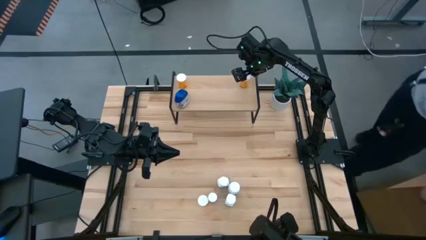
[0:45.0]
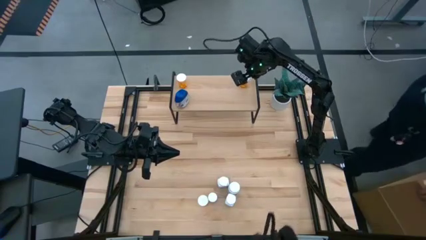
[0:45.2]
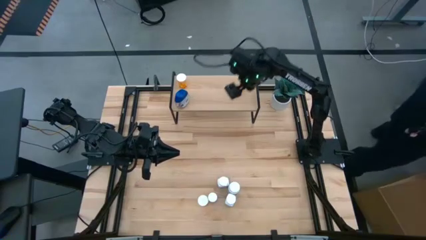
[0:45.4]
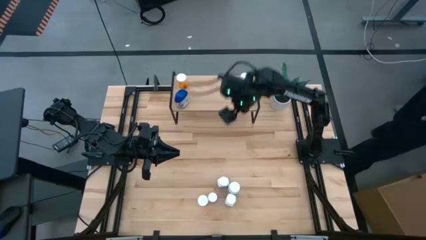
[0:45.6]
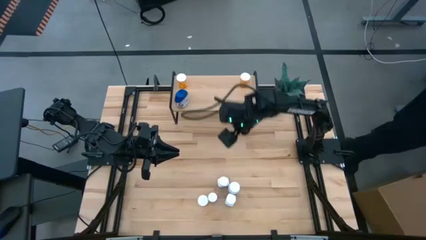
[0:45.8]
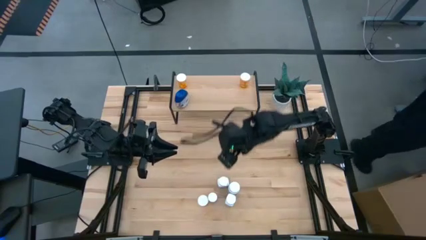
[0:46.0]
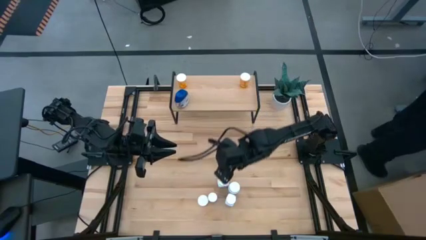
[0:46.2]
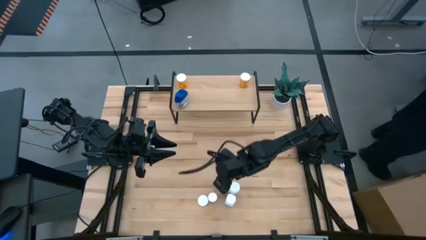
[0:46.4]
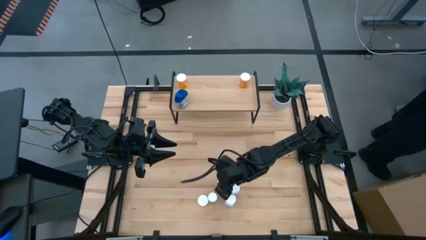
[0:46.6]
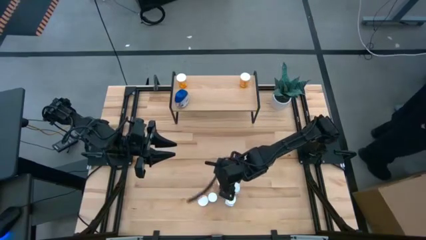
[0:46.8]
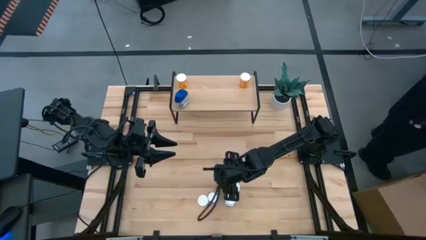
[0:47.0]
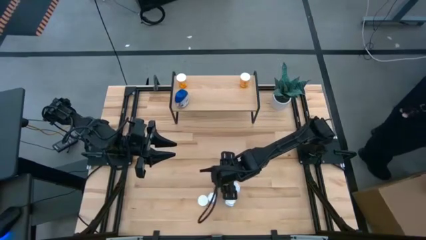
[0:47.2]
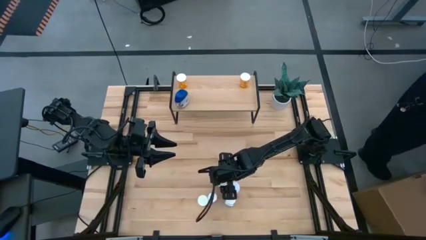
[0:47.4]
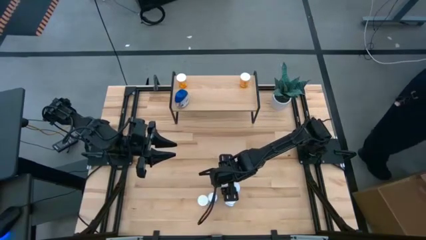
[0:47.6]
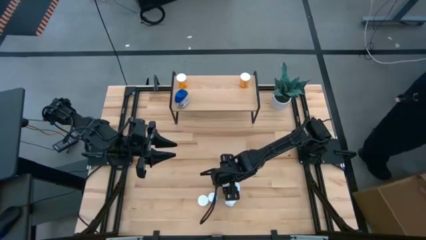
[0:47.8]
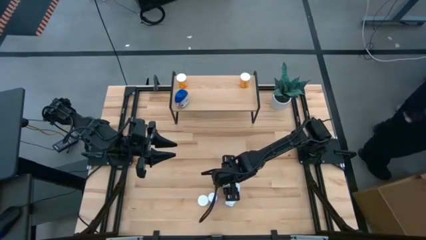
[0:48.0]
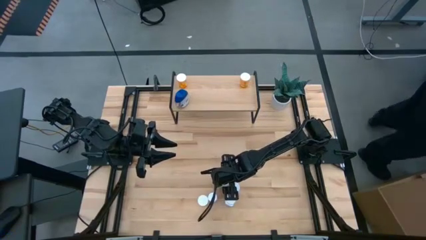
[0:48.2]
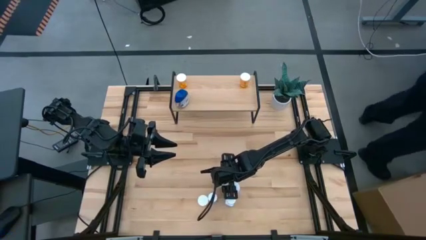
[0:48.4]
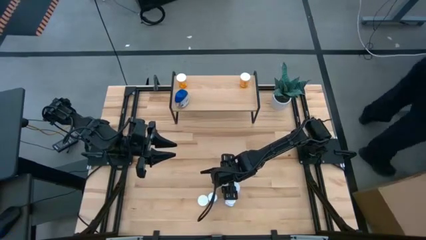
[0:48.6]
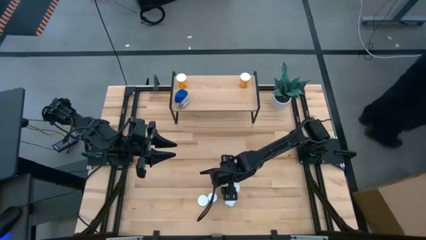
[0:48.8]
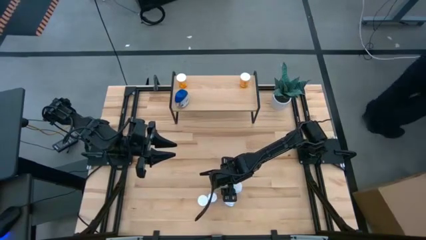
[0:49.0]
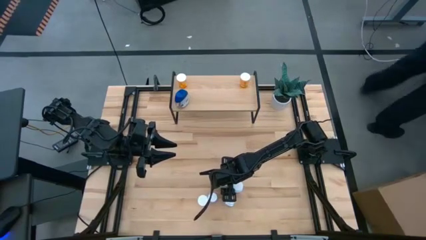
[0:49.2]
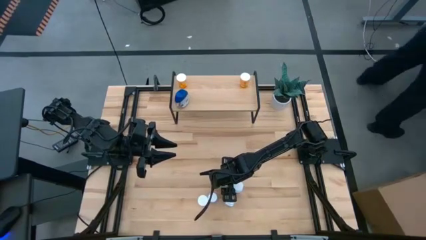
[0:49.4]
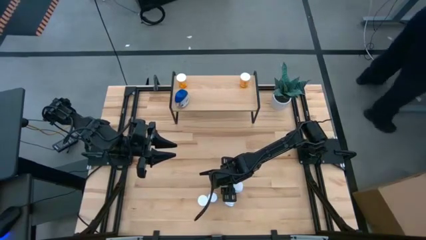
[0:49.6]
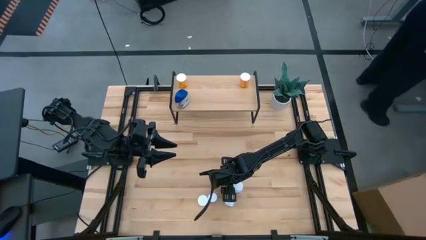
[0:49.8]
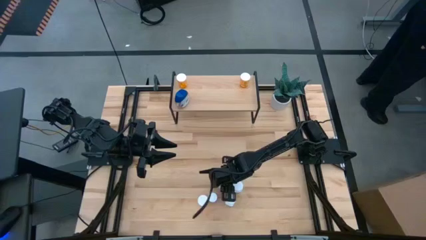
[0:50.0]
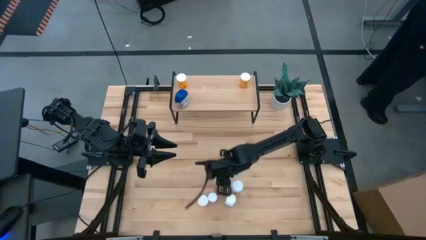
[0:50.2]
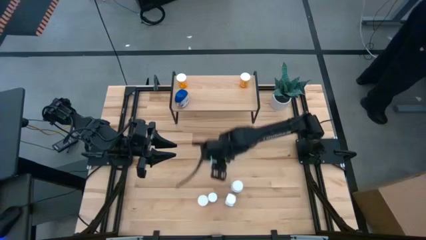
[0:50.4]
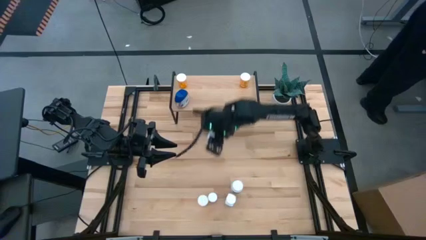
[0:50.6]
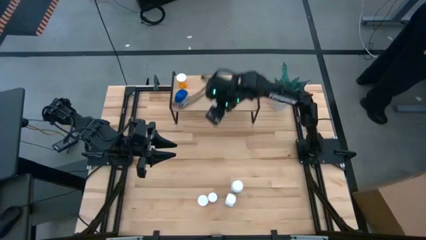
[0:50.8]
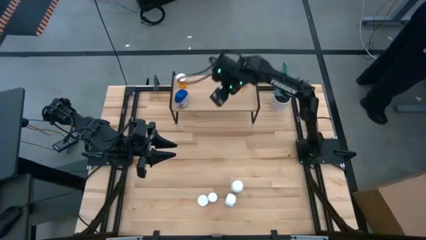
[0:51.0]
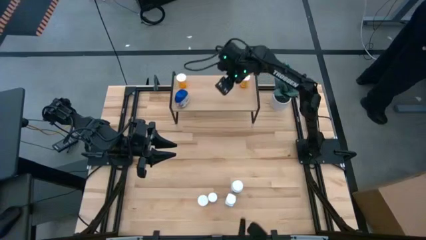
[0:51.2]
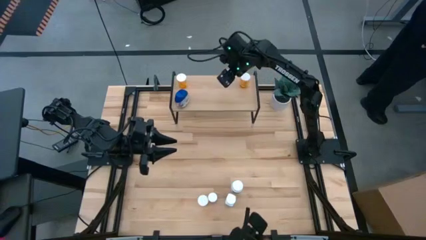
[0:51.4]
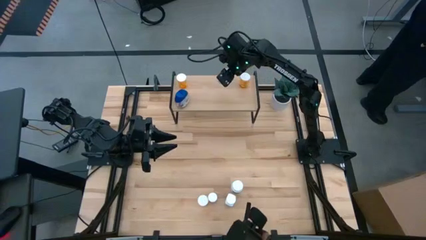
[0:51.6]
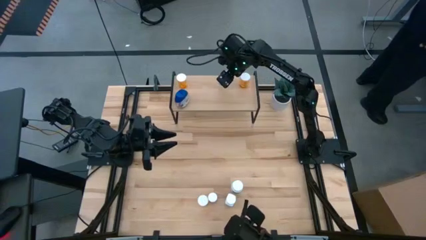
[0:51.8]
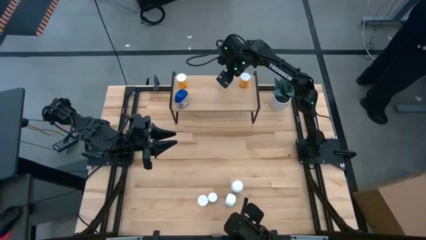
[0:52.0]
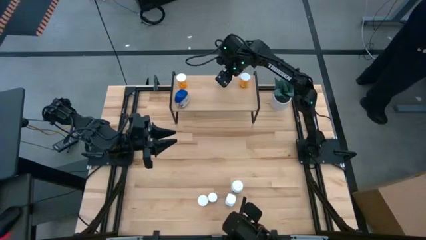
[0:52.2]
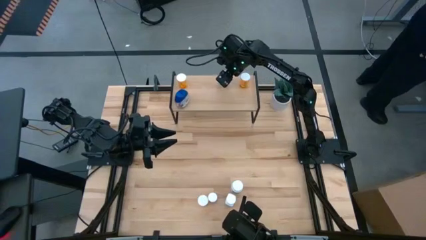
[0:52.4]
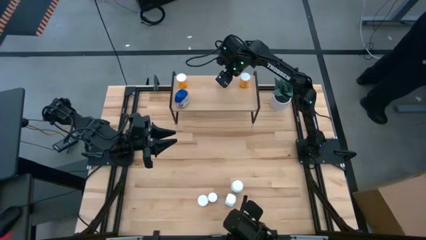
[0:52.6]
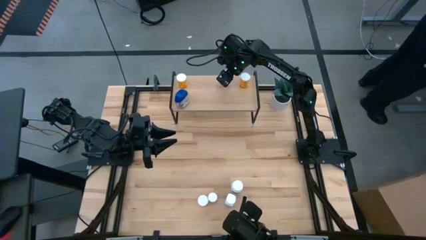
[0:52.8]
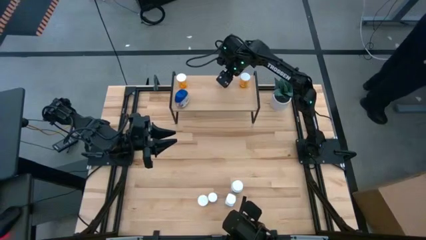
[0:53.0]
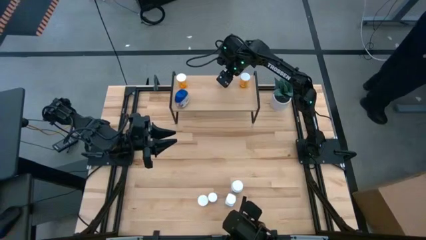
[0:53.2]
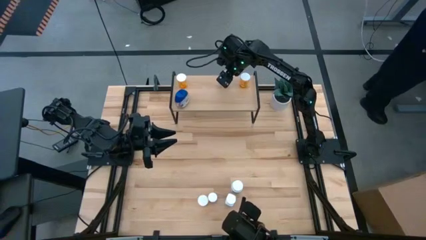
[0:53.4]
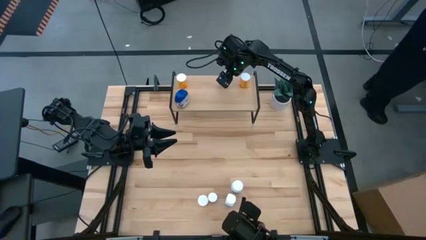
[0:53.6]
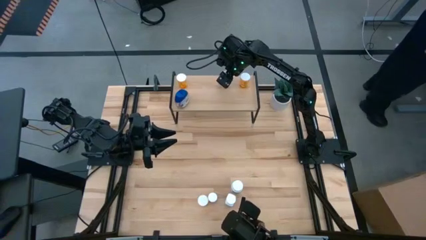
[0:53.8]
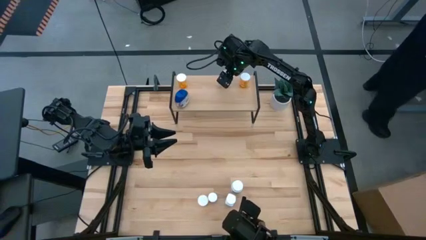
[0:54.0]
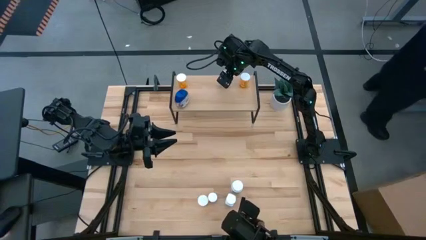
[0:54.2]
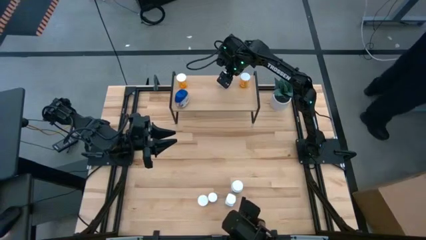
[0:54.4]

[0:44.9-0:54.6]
Task: Pick and place medicine bottles onto shelf by color
Put the top blue and white bottle on the shelf

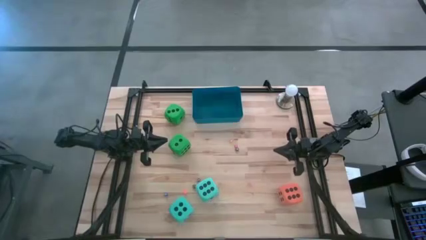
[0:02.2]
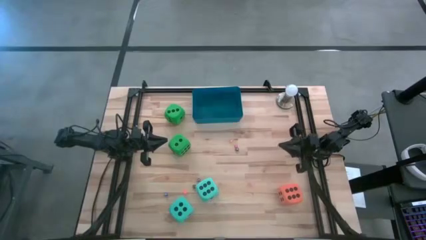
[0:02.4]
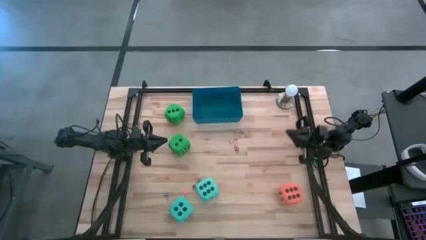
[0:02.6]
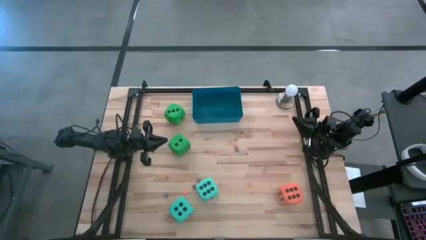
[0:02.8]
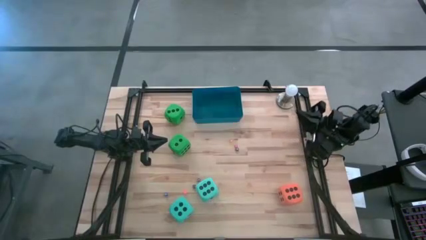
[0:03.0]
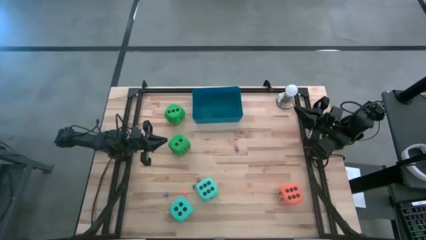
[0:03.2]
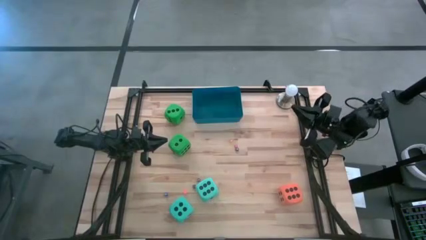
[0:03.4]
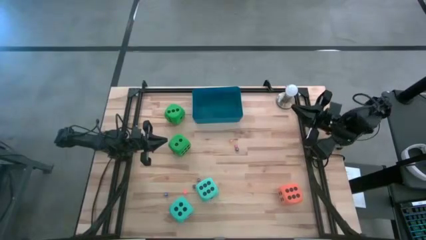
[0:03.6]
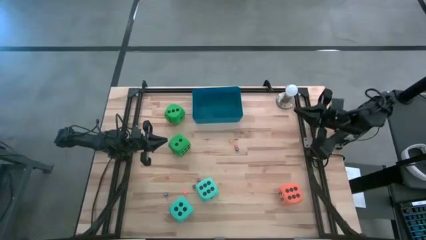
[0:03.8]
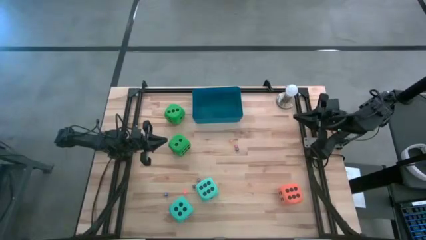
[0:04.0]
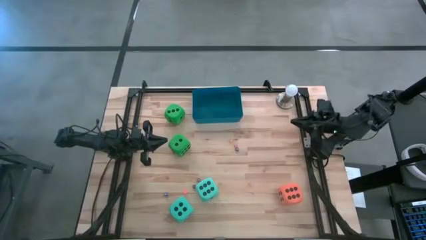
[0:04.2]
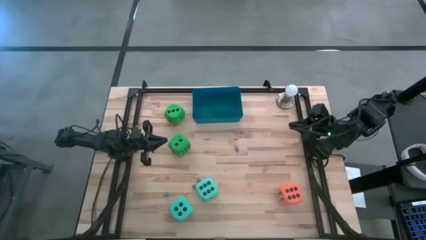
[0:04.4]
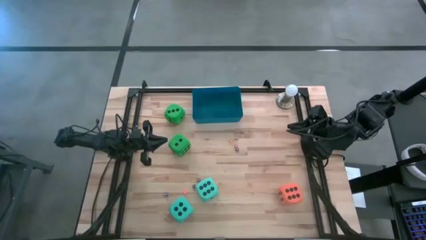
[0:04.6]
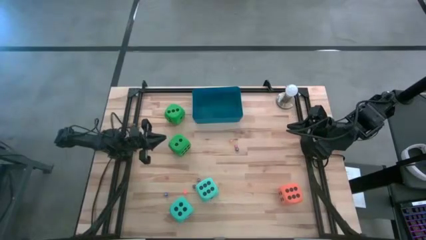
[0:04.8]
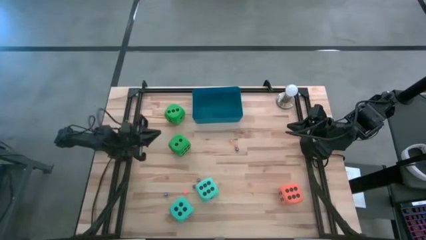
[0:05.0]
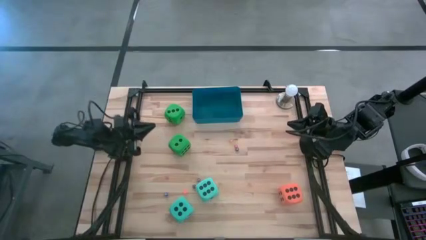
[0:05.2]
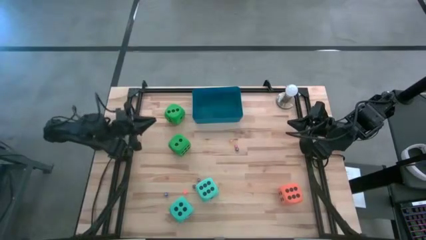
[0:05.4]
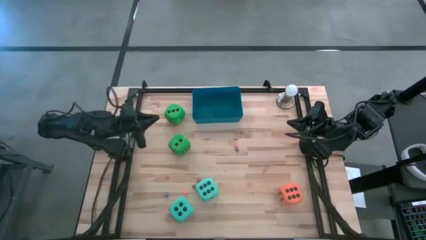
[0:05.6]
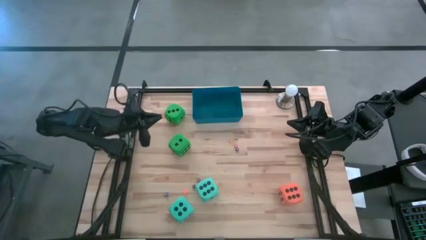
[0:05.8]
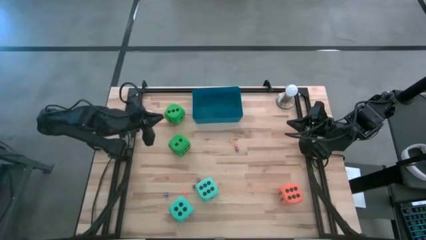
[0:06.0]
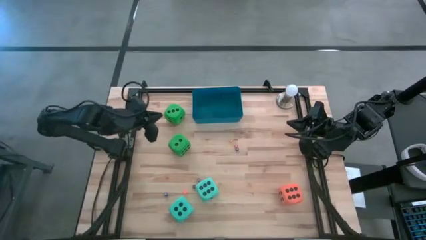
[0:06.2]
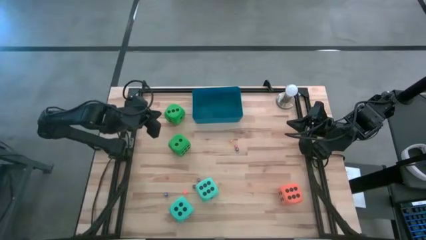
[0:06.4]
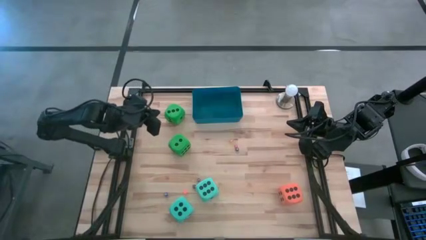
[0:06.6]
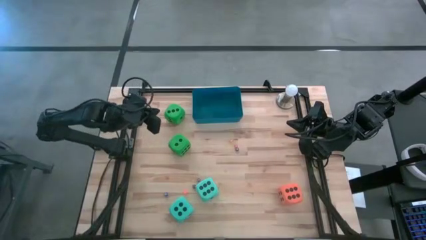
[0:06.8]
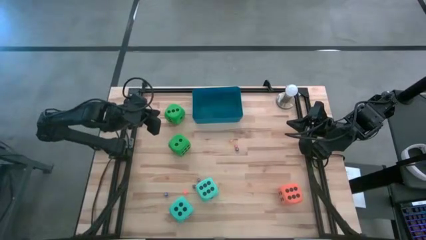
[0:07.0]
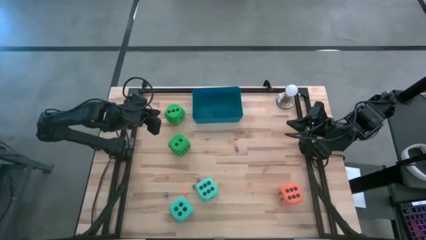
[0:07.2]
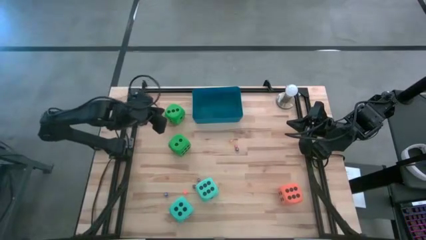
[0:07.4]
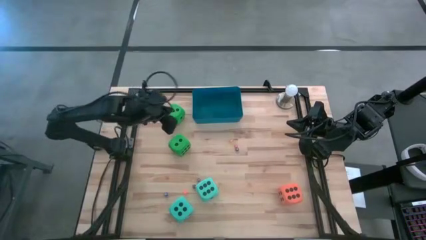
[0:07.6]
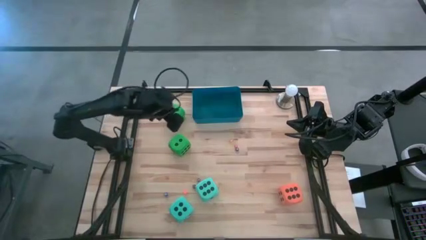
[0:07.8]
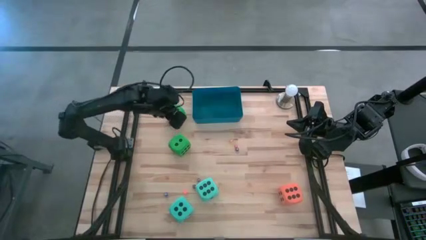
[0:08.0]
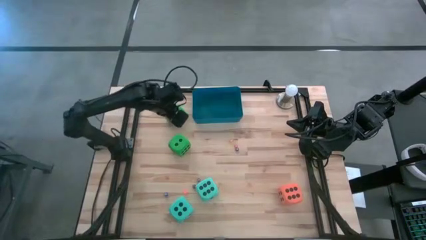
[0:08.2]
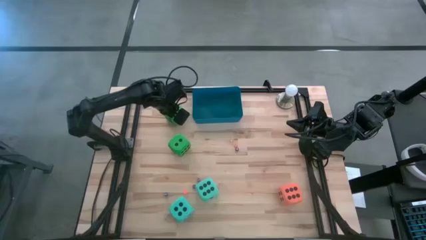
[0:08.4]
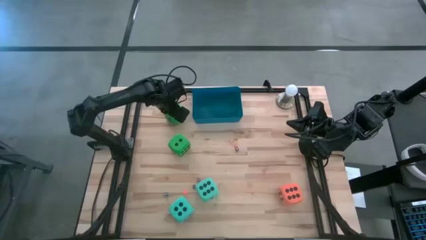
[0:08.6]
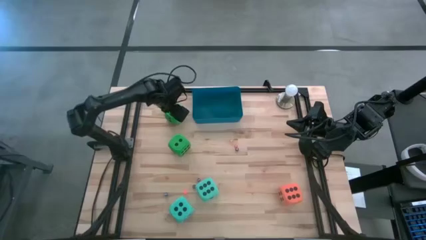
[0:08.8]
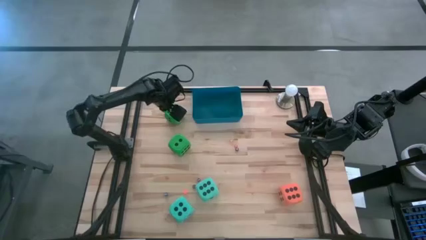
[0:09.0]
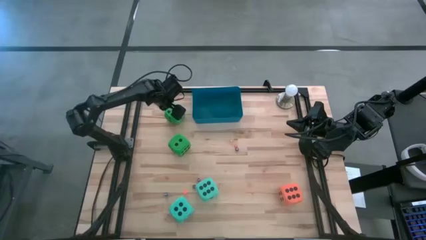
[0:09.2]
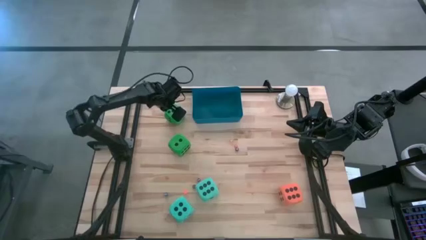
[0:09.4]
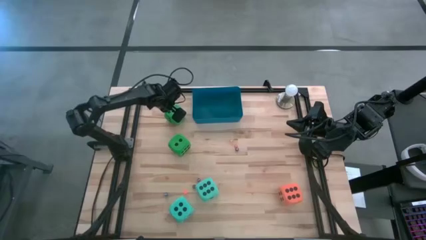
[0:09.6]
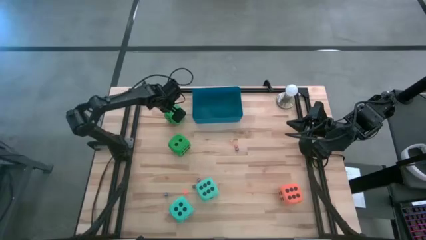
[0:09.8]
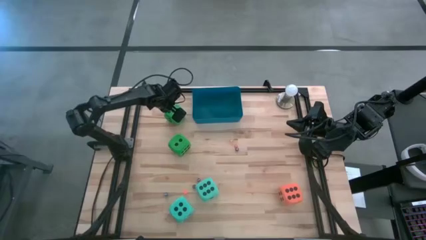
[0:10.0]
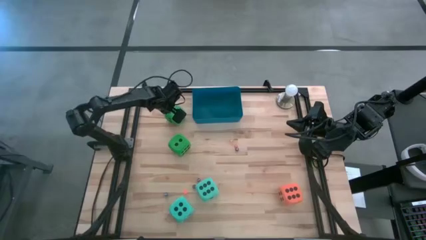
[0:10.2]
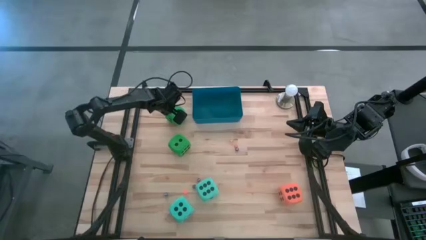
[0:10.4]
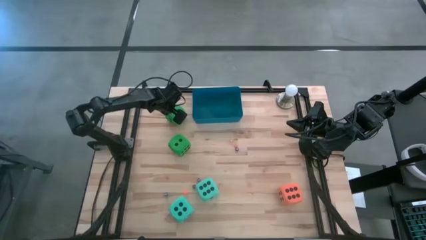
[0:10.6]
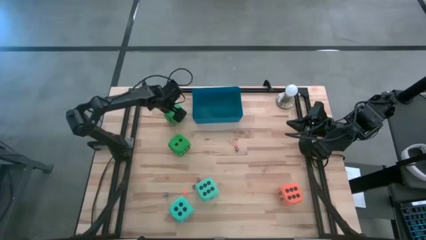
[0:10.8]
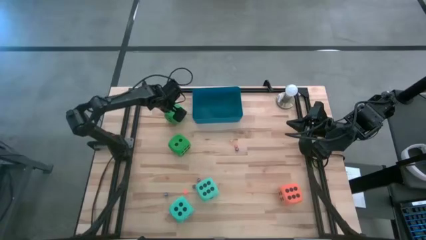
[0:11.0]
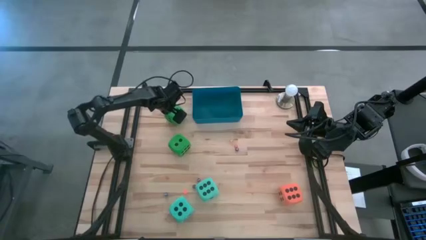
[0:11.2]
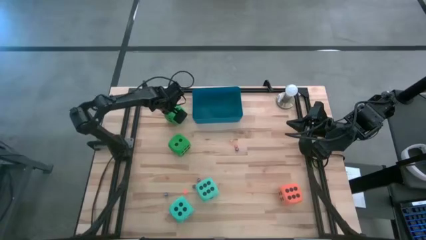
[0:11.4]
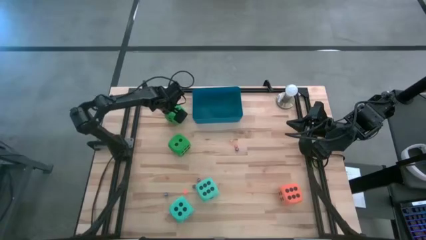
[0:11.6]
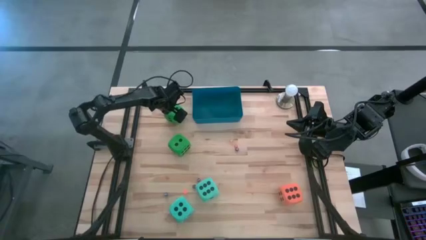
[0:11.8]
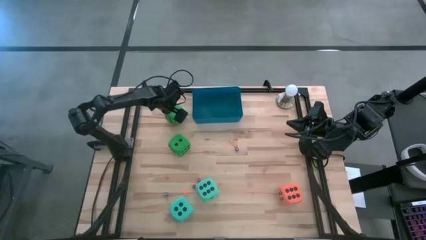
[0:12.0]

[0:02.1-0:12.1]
Task: Pick & Place Dice
Put the top large green dice into the blue bin
